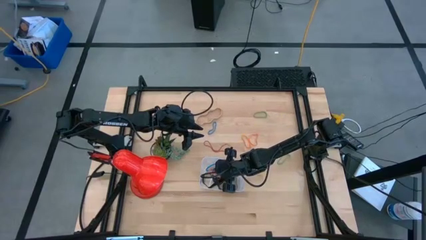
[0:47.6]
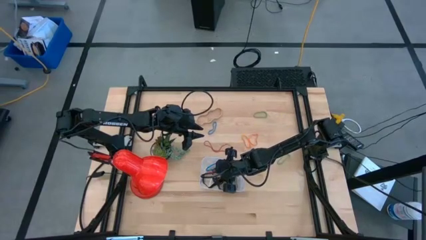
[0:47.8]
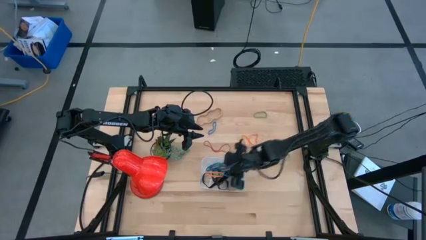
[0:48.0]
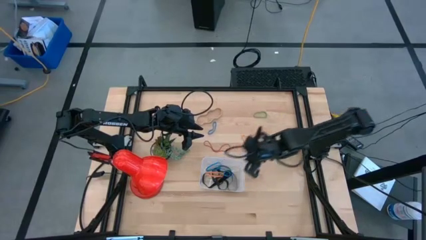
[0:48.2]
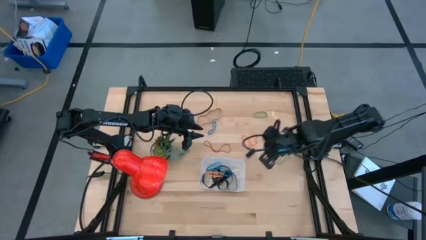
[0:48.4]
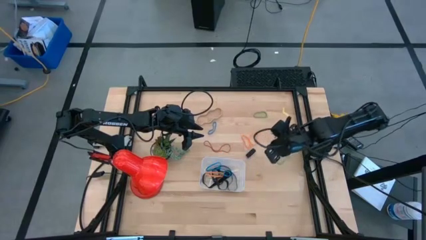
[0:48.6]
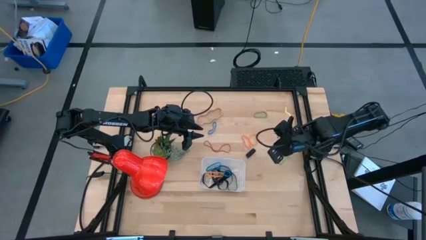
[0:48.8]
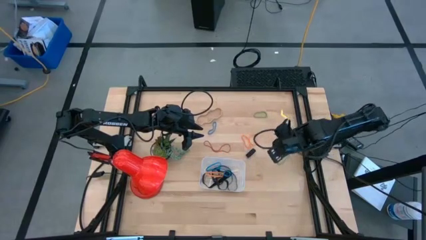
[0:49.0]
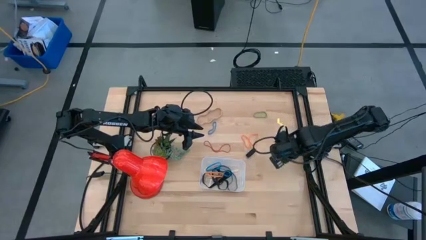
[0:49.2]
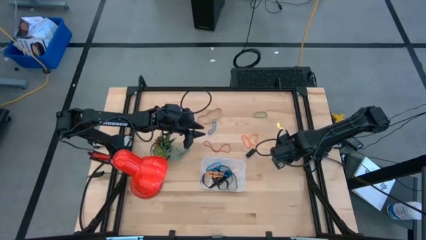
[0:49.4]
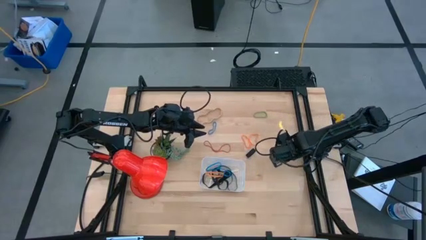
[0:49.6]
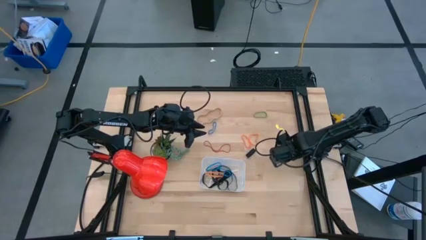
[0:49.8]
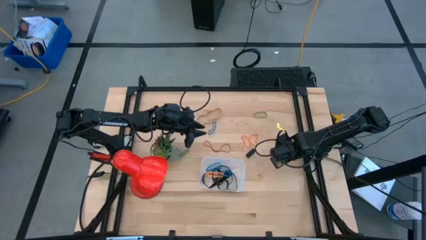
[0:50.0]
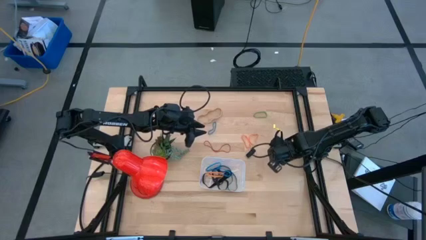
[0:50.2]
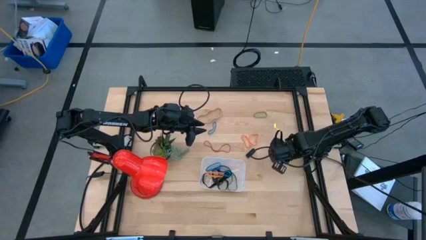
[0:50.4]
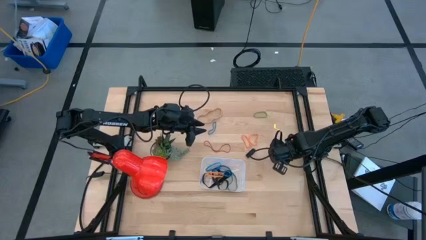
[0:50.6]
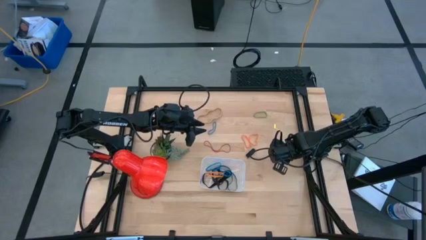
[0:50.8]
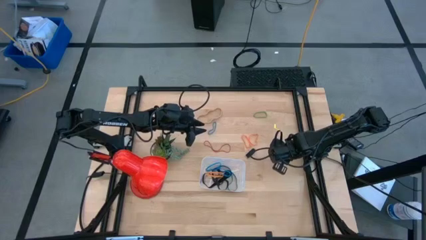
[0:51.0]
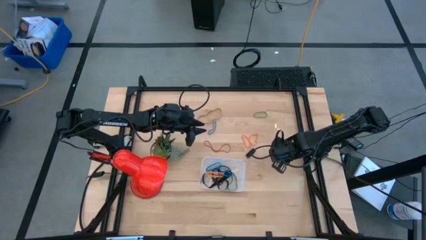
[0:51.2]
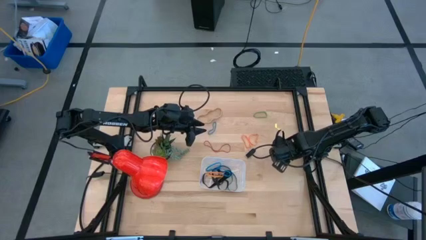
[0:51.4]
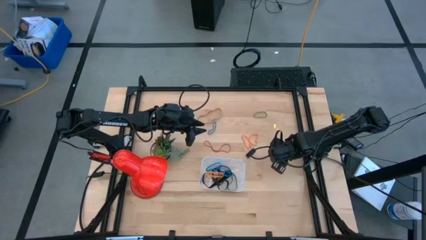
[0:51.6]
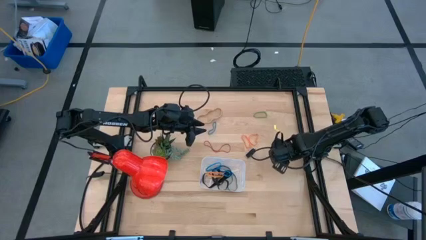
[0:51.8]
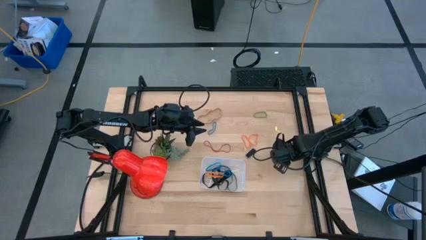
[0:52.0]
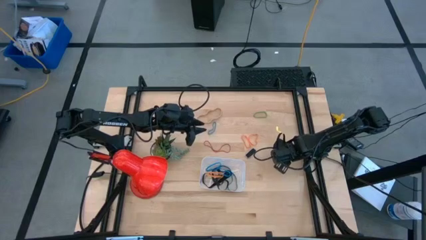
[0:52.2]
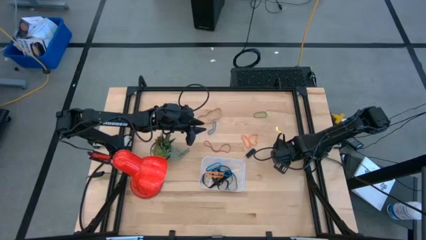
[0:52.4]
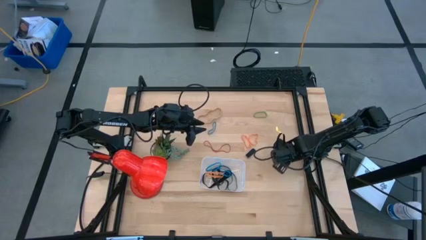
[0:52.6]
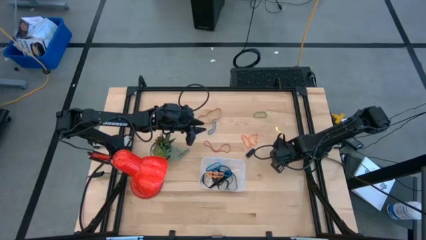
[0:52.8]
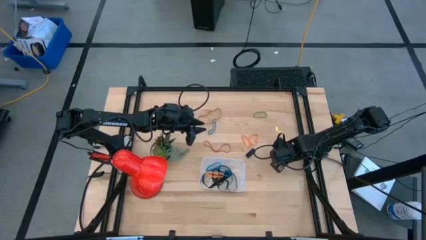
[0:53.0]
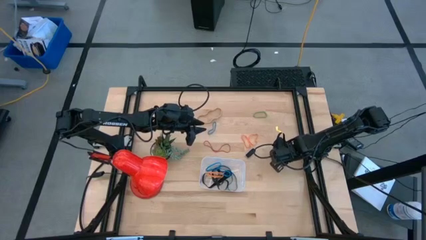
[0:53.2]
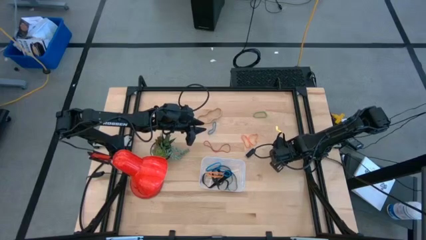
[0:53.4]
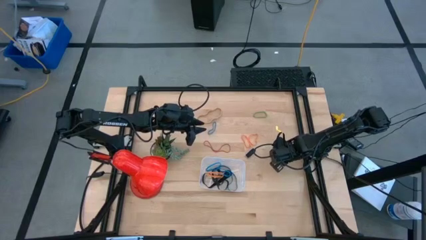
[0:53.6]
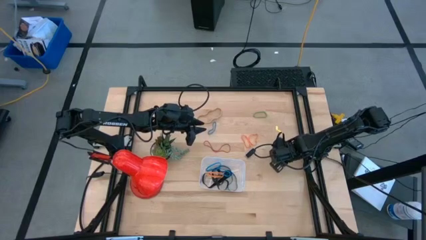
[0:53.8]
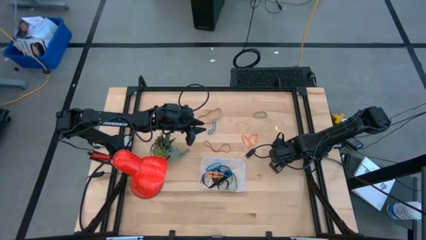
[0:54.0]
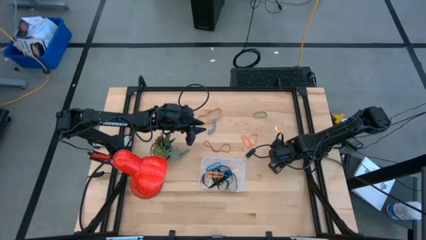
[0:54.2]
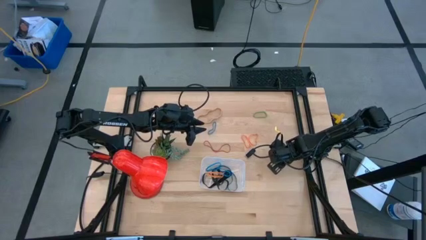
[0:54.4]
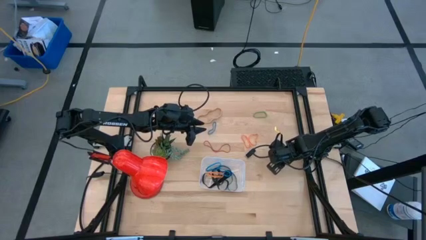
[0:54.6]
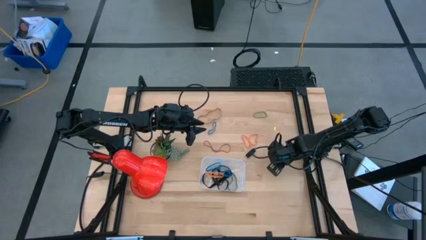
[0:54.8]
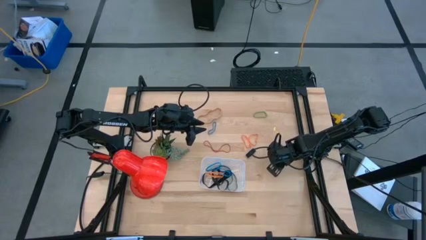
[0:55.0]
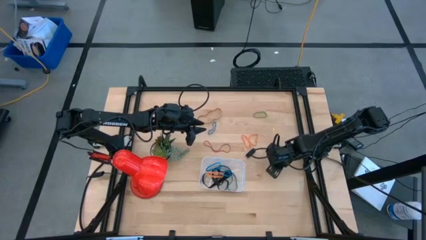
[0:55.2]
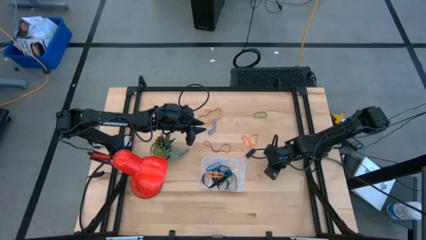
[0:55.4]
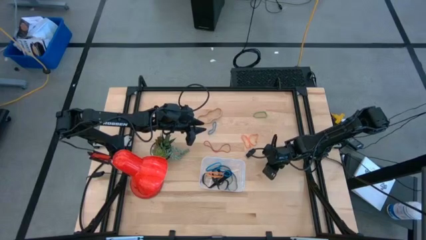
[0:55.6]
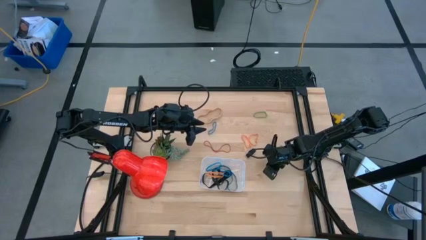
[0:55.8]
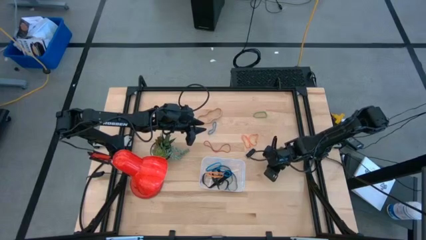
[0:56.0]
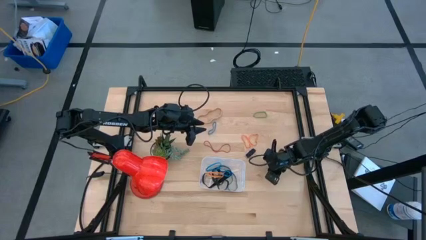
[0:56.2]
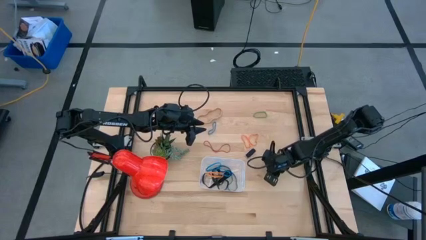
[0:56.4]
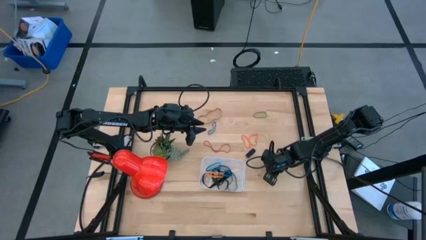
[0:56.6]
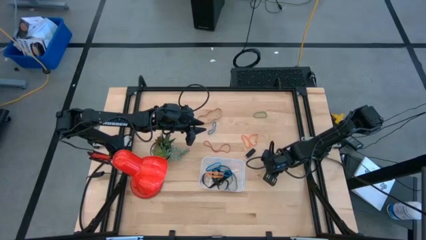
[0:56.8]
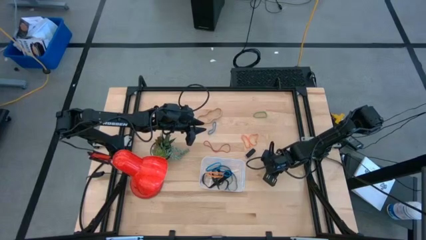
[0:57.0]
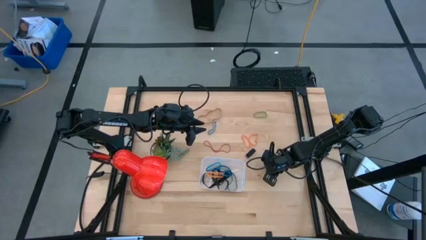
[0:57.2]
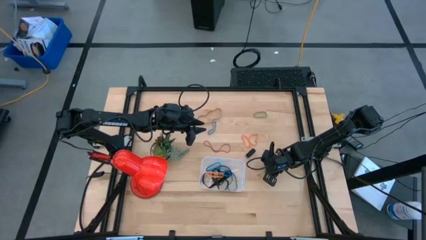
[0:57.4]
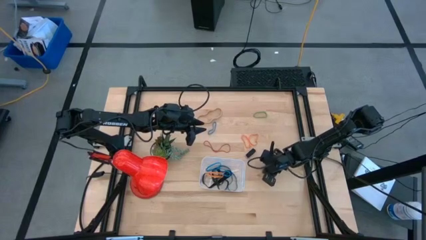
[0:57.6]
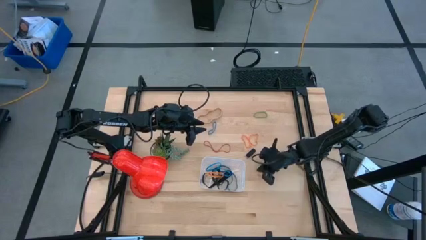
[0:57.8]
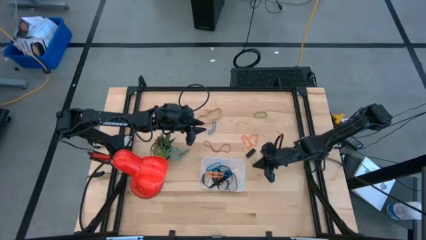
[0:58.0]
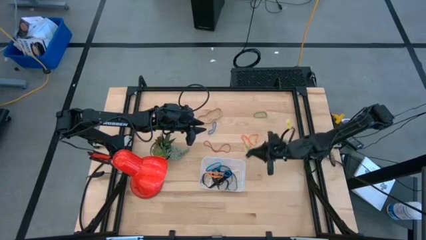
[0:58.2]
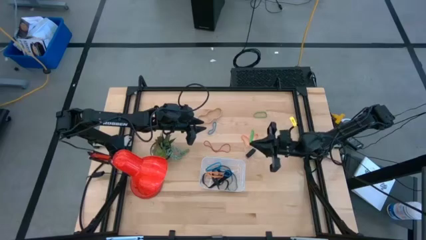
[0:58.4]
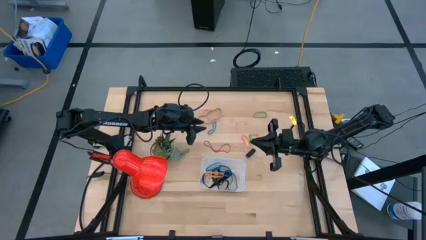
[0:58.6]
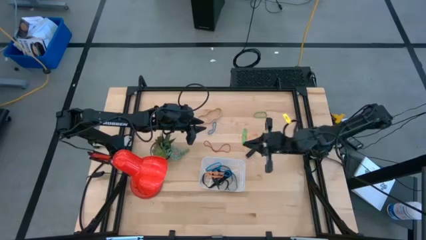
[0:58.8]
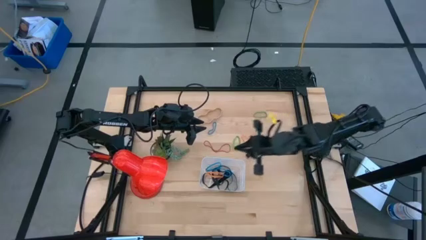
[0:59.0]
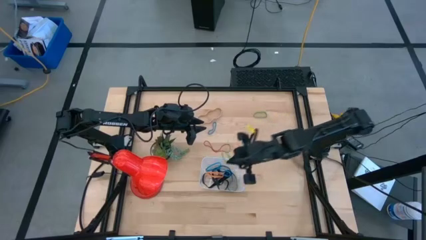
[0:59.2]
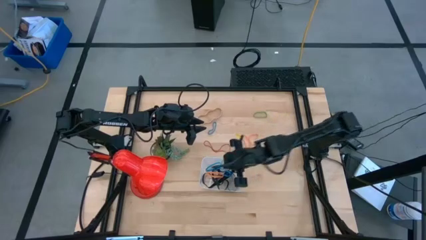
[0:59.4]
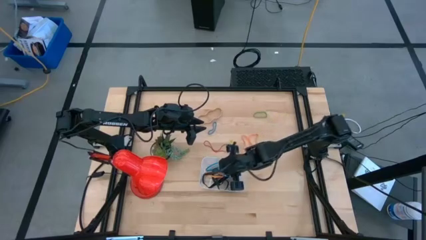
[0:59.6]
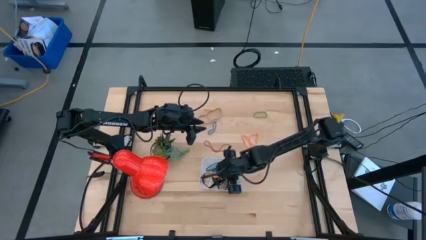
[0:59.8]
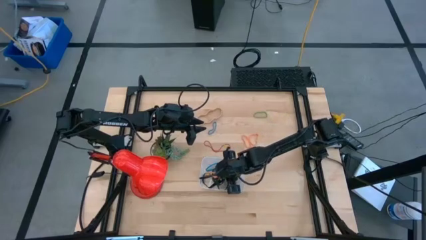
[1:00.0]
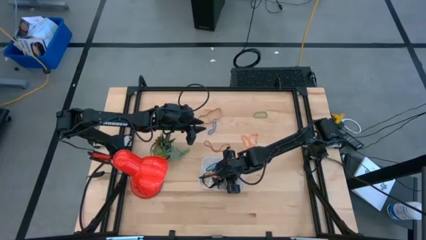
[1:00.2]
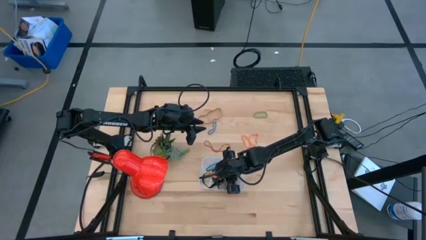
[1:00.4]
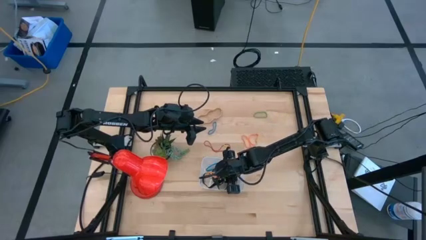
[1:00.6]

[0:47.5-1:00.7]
Task: Pick and place rubber bands into bin
Put the bottom green rubber band into the bin
